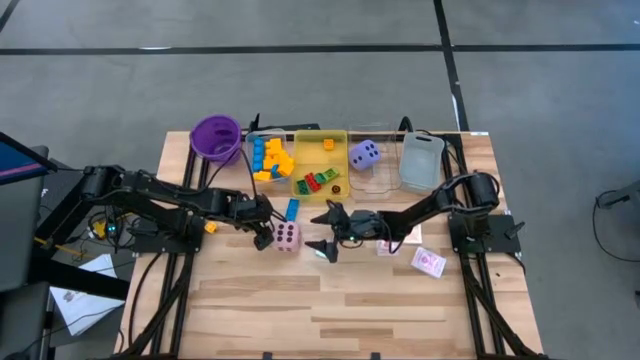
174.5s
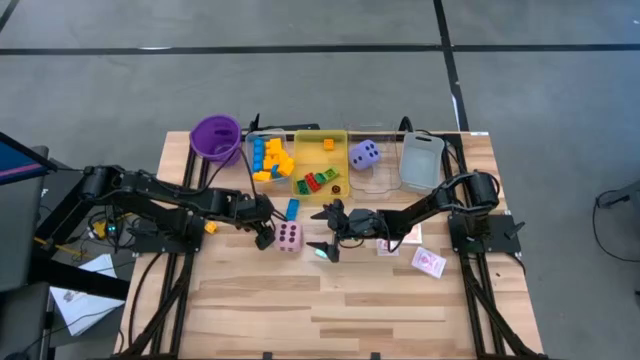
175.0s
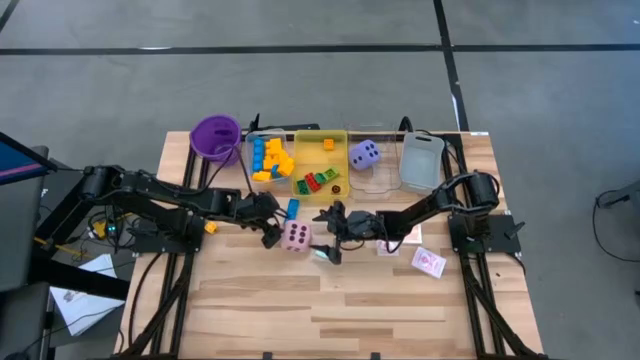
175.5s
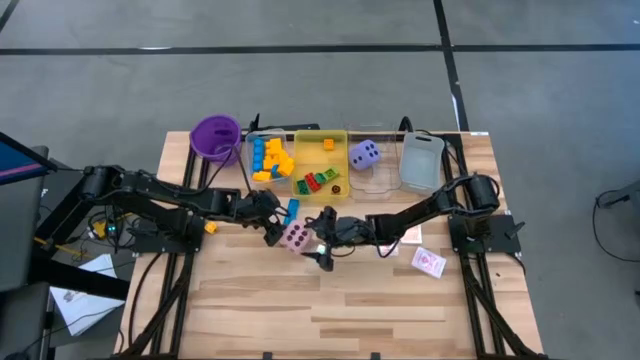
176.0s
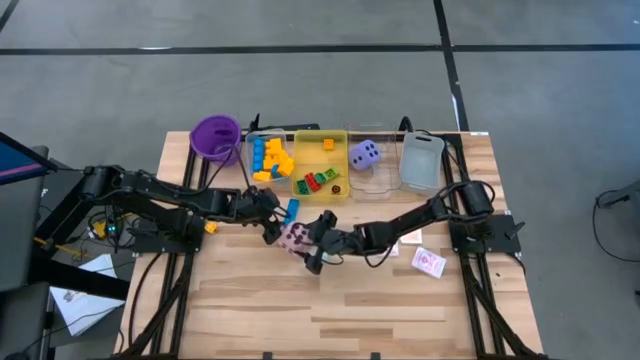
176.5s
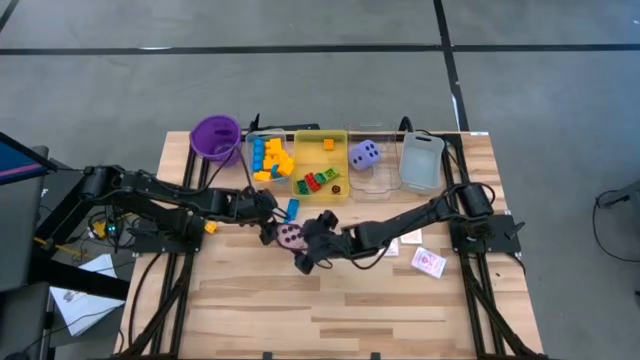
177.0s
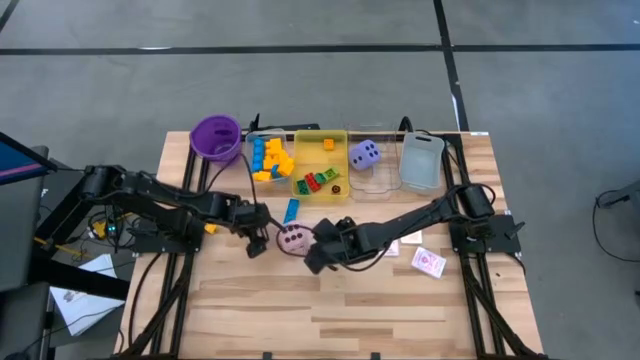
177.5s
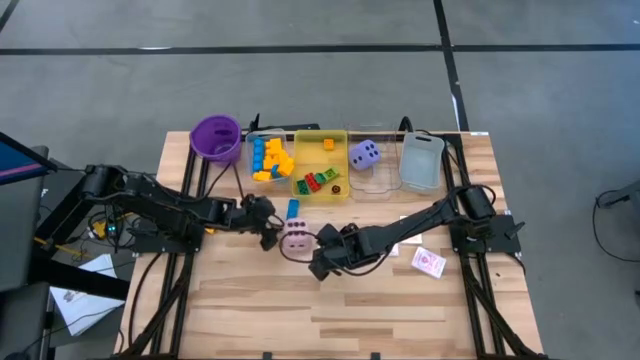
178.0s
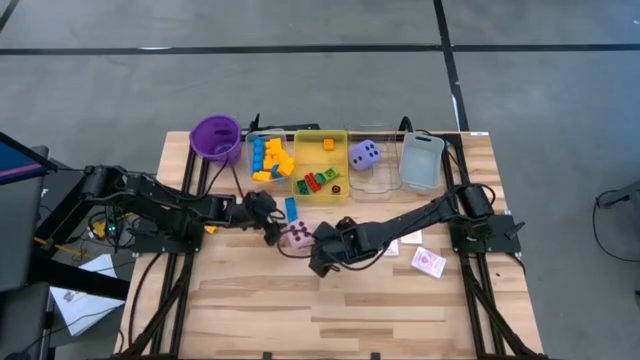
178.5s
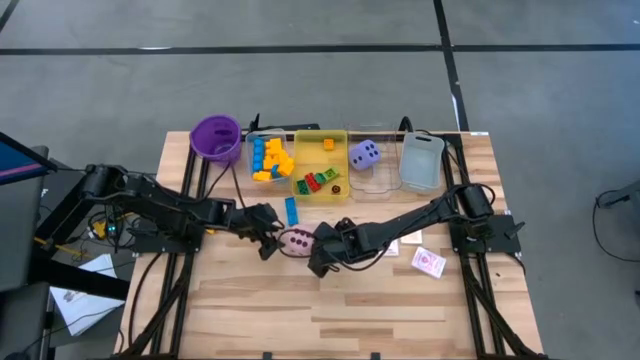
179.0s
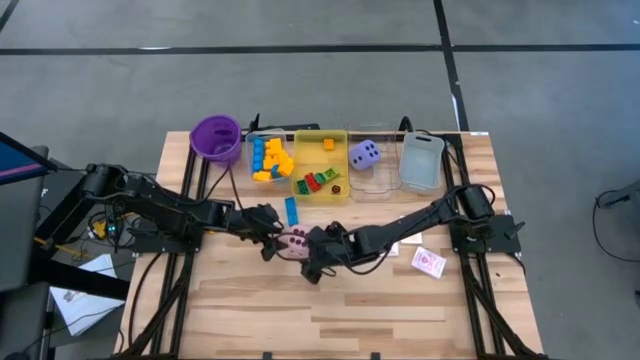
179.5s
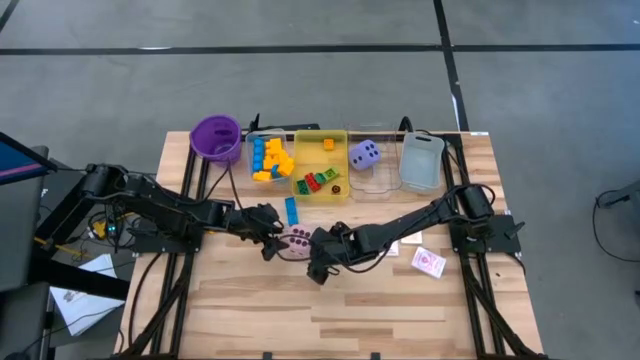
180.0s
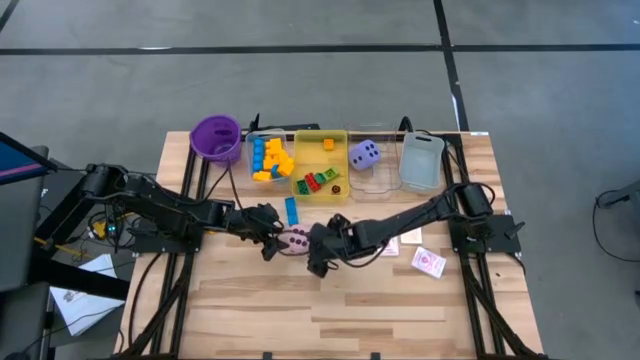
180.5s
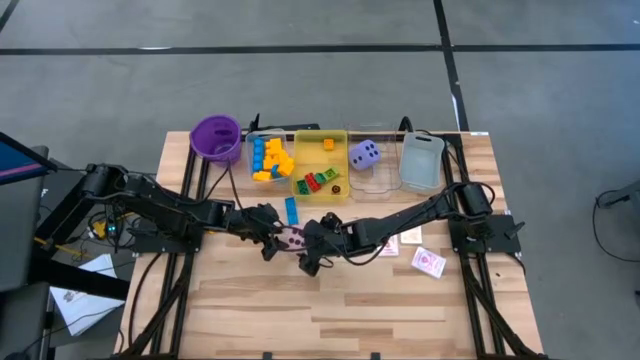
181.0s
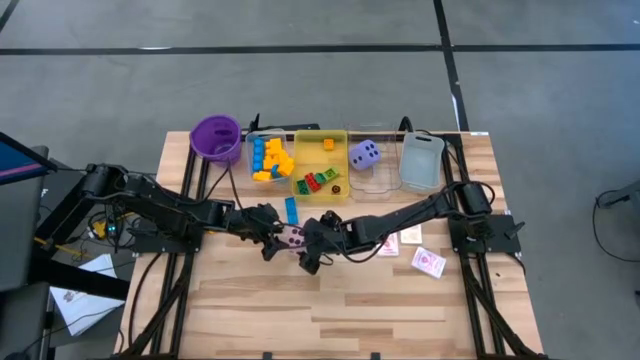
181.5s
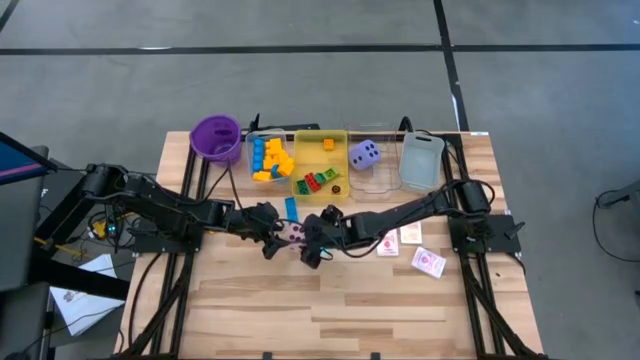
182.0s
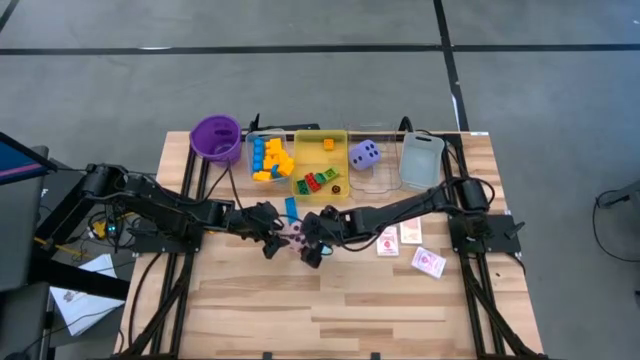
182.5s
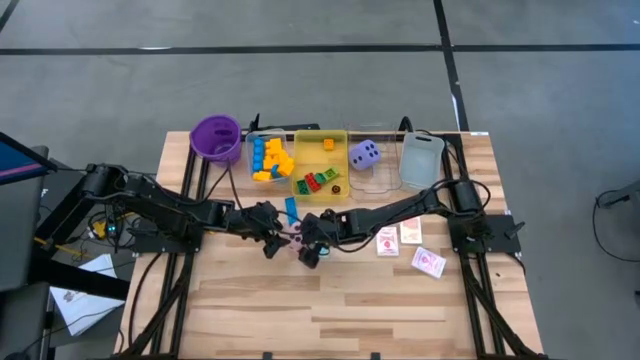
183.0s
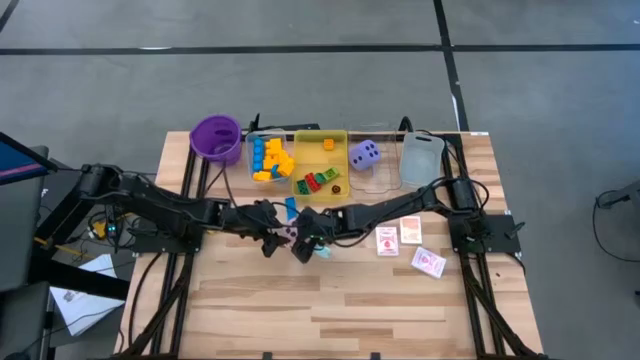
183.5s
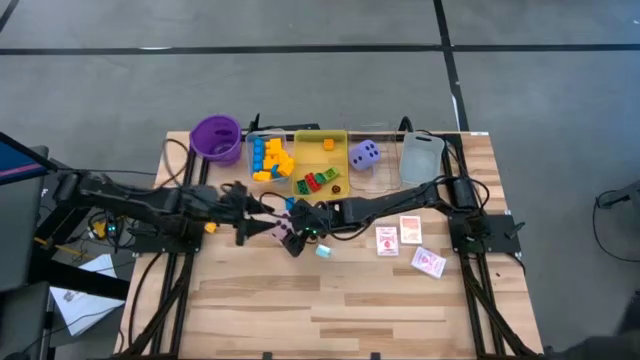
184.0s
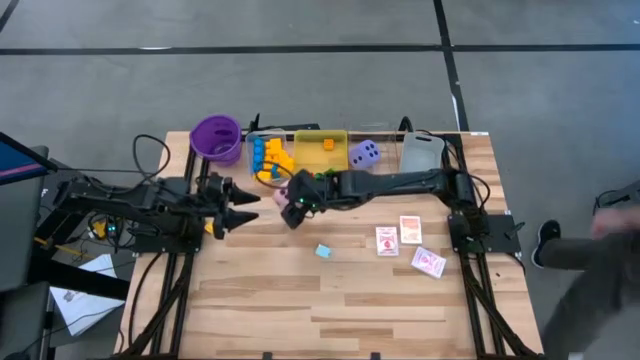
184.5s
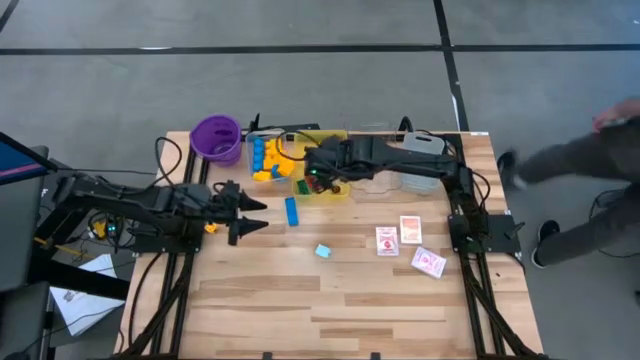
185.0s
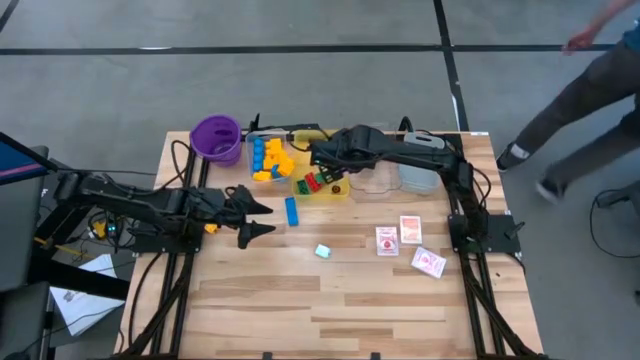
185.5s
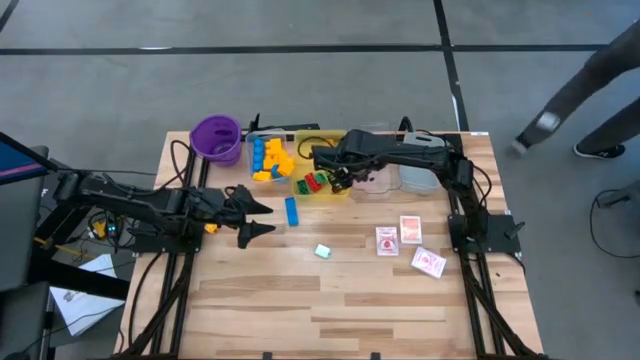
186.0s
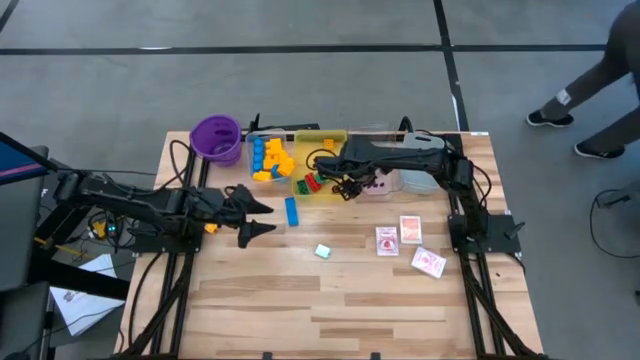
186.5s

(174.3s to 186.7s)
Task: Pick & Place Toys
Put the pink dice into the right transparent bin

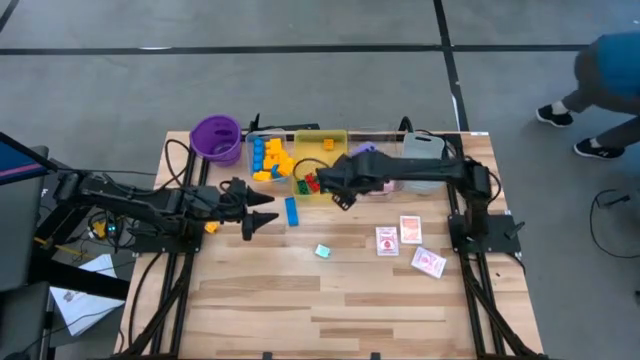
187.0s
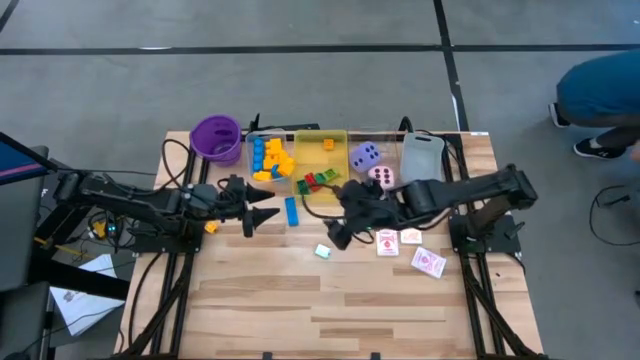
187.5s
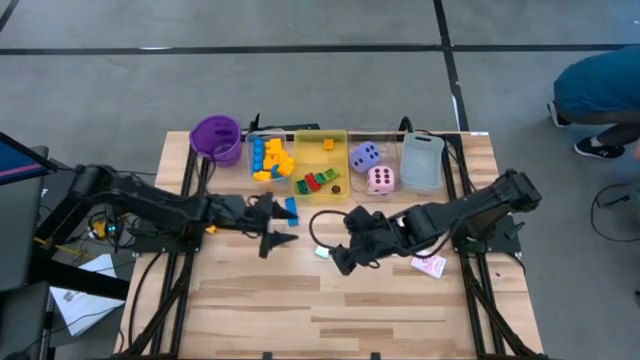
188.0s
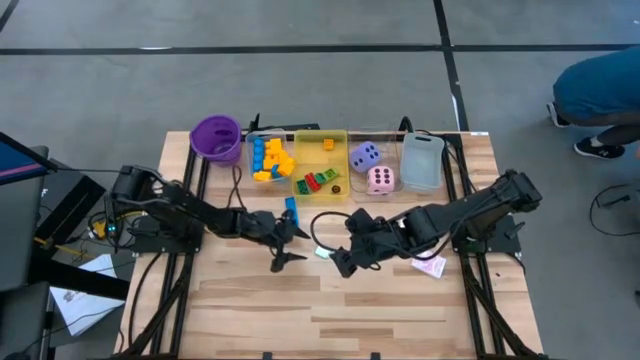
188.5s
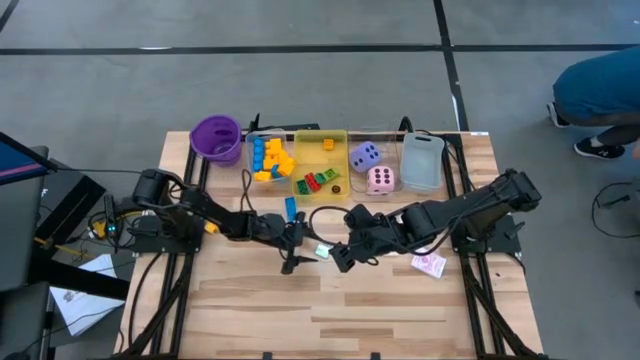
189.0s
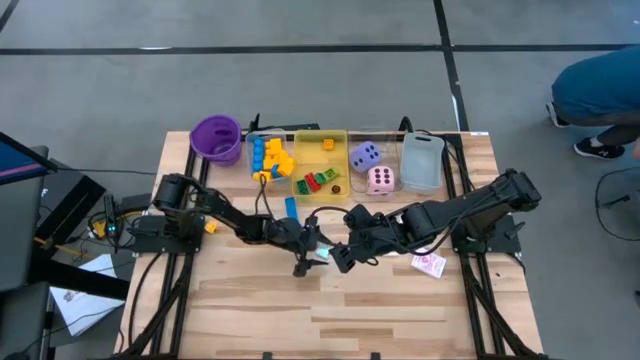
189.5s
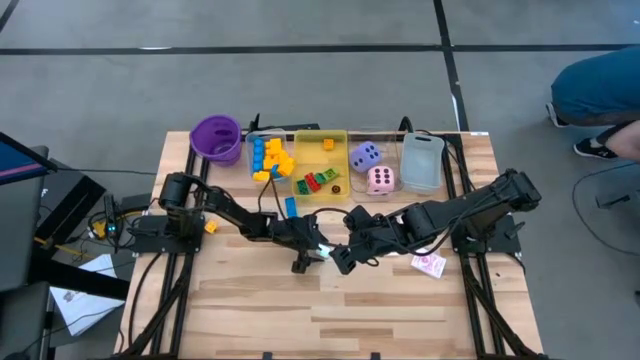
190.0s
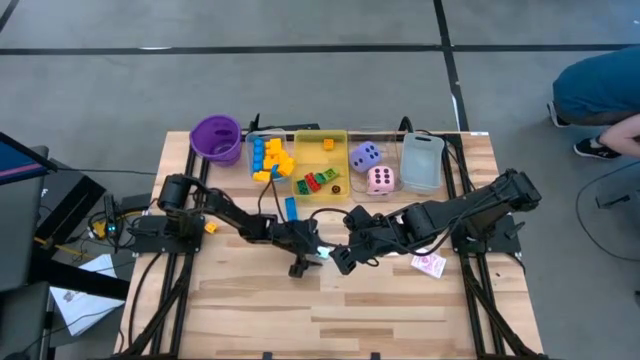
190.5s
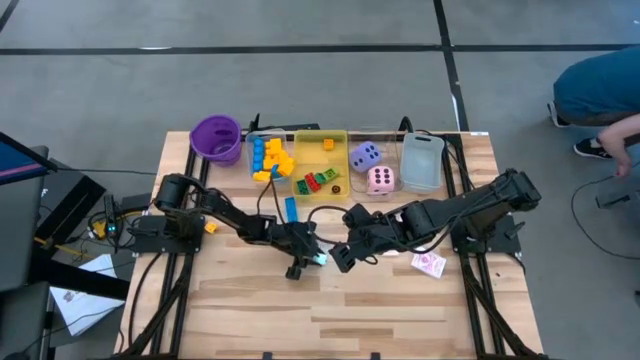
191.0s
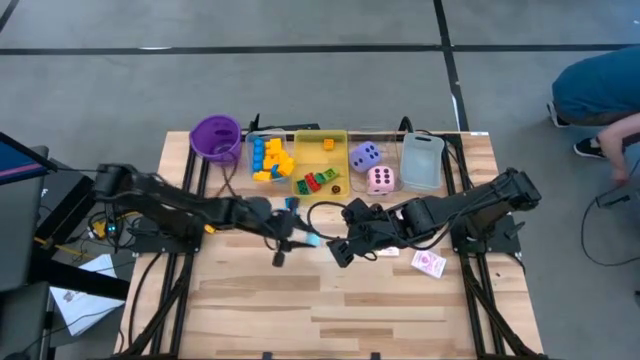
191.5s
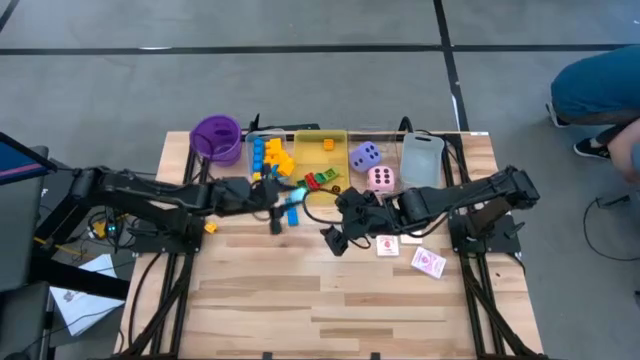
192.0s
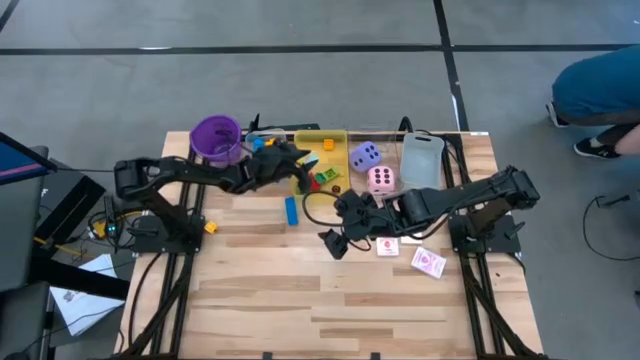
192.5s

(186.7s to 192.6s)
Put the light blue two stud game piece into the yellow bin

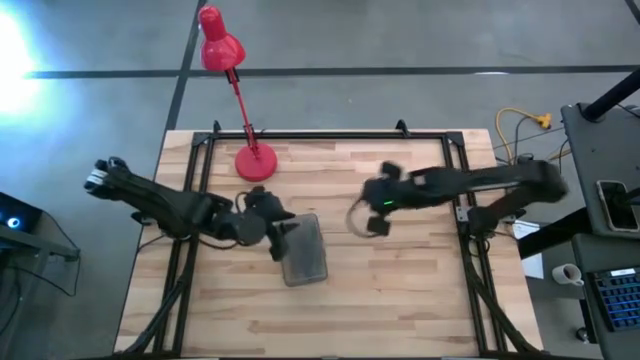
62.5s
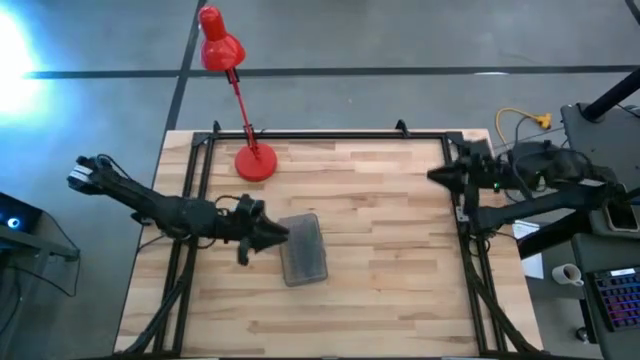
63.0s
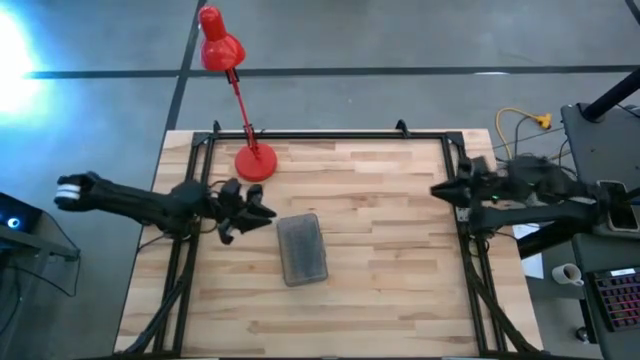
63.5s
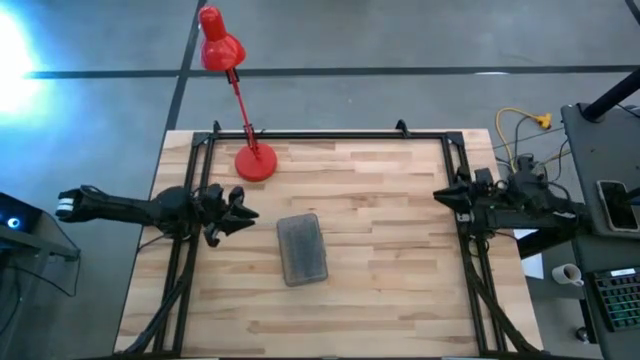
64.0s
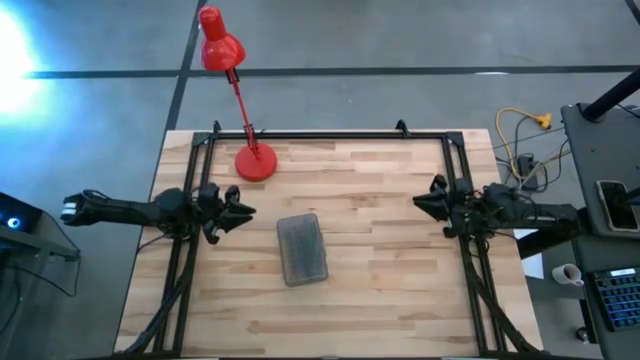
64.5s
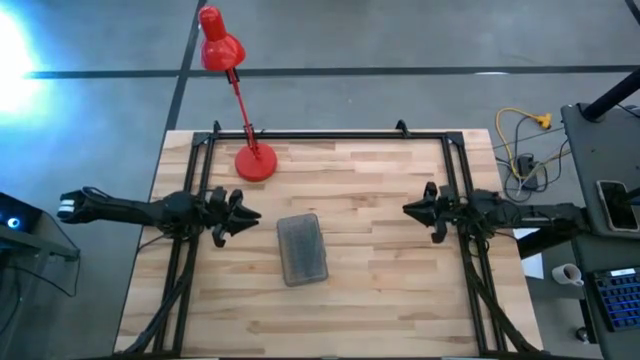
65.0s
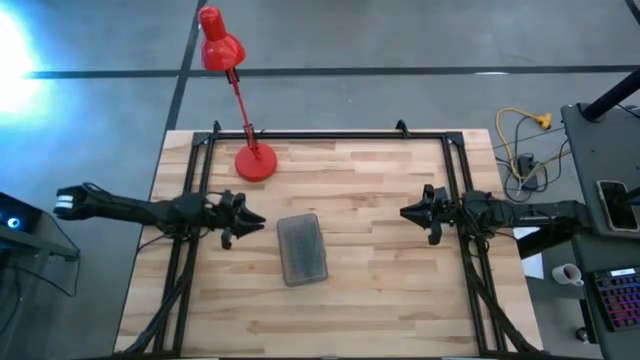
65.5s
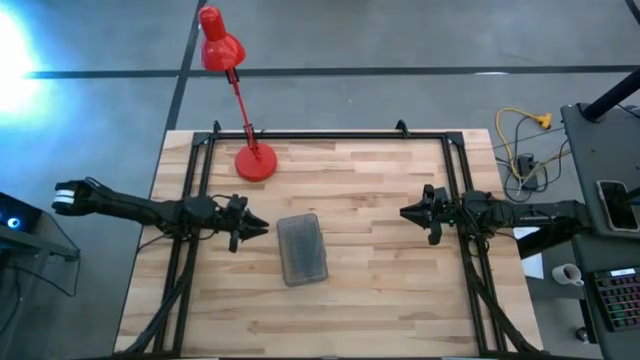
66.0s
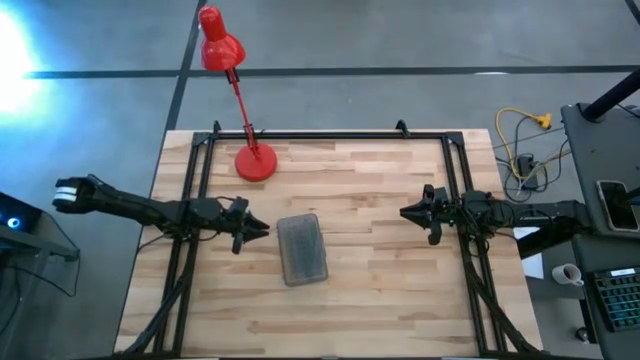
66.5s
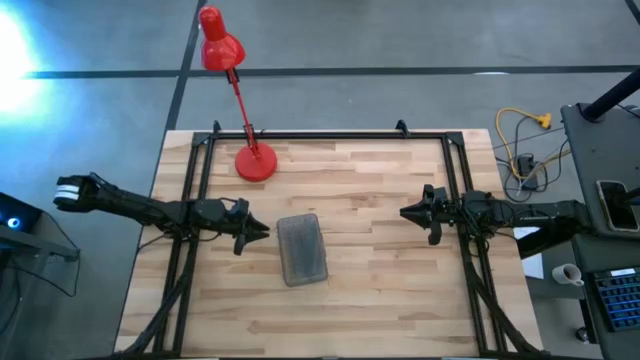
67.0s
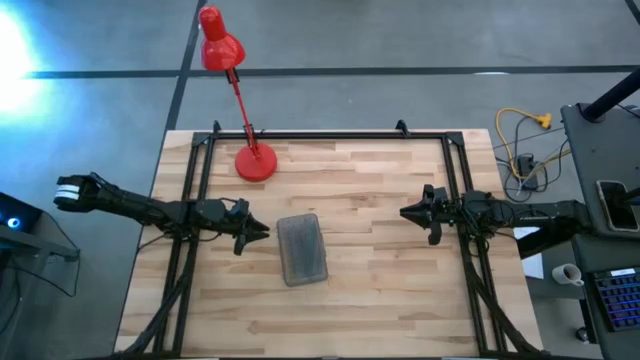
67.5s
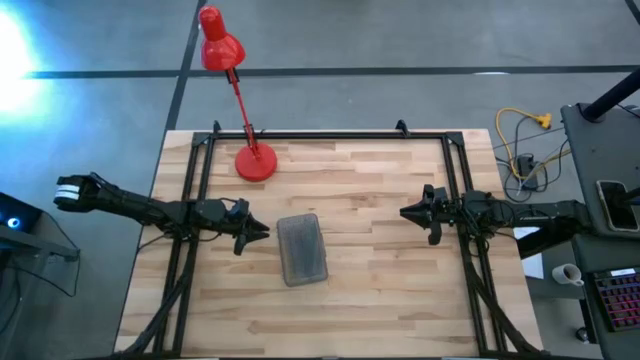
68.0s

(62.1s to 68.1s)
Task: Pick & place school supplies into a supply box
Return to Home Position
